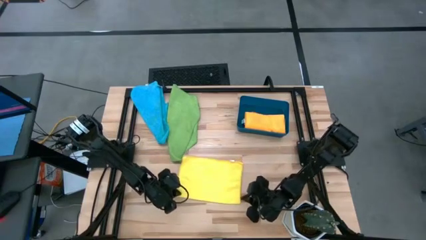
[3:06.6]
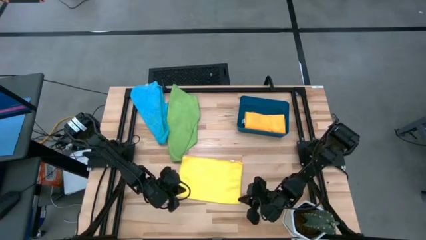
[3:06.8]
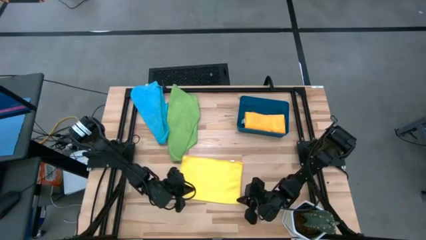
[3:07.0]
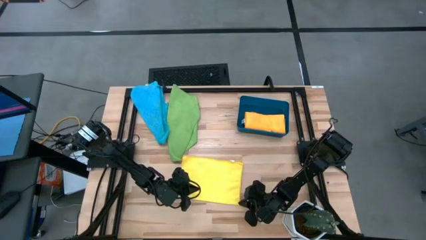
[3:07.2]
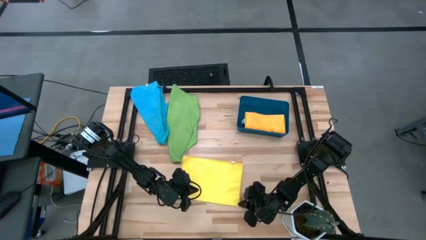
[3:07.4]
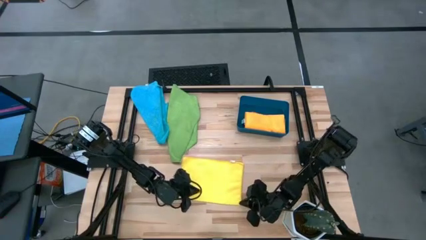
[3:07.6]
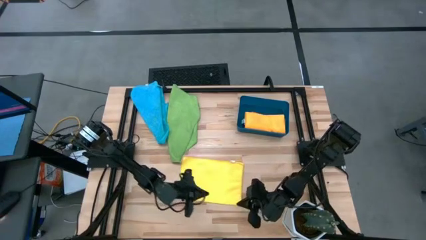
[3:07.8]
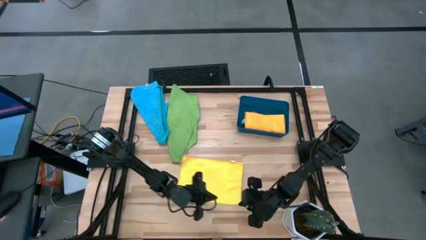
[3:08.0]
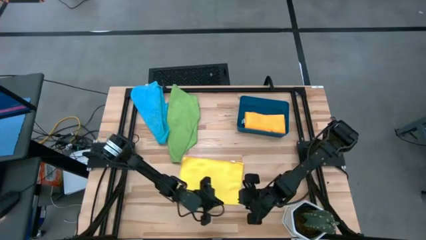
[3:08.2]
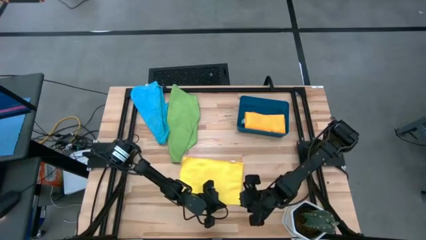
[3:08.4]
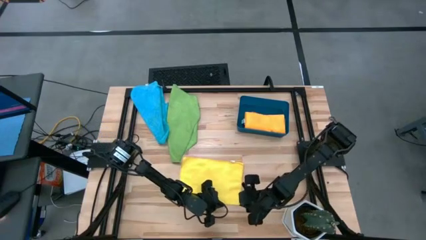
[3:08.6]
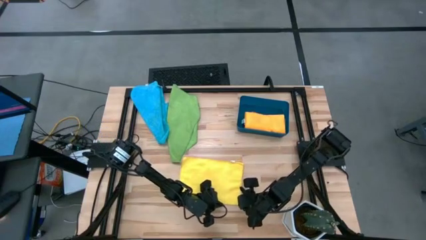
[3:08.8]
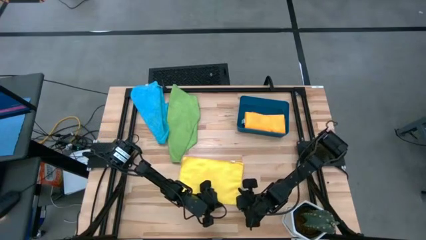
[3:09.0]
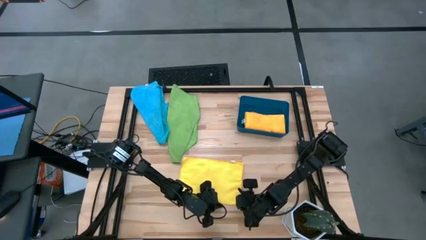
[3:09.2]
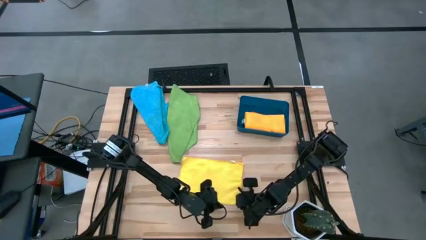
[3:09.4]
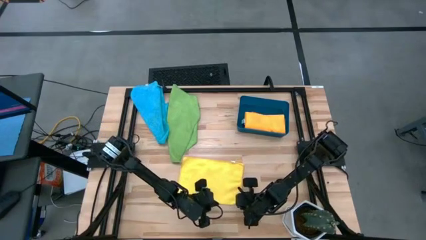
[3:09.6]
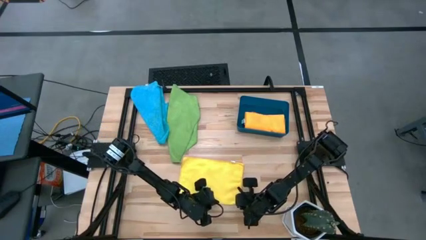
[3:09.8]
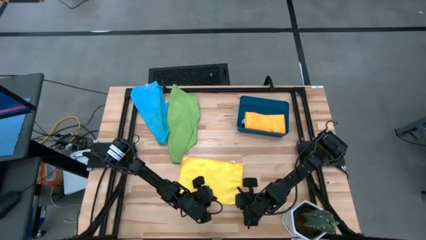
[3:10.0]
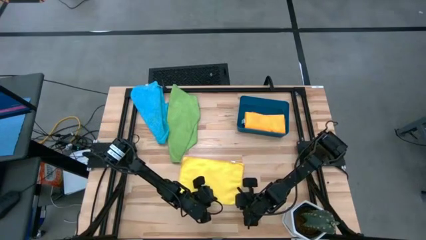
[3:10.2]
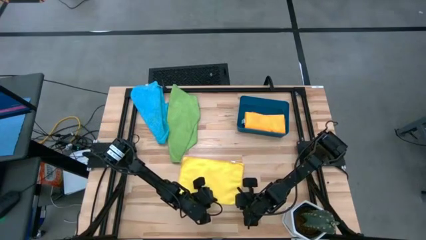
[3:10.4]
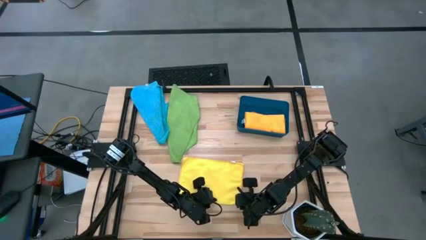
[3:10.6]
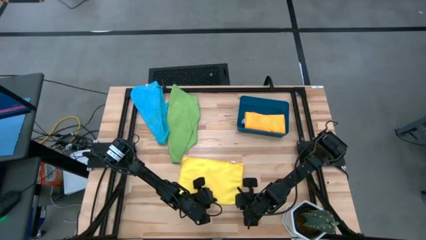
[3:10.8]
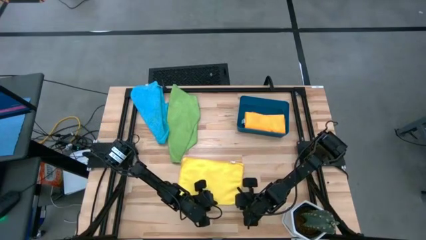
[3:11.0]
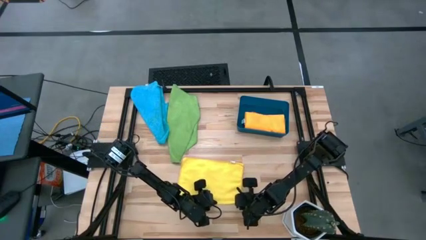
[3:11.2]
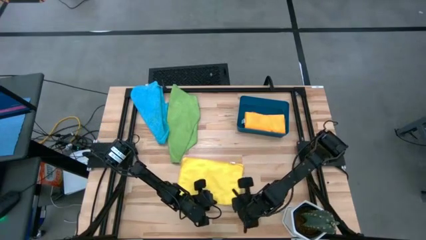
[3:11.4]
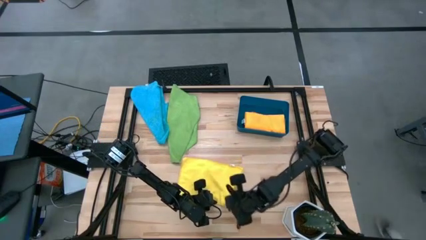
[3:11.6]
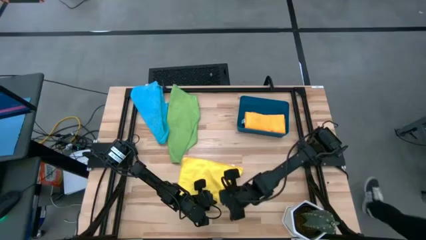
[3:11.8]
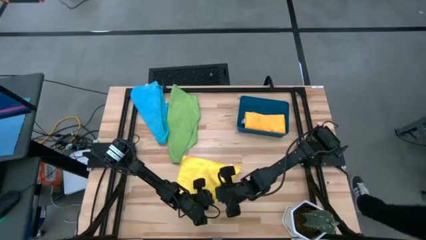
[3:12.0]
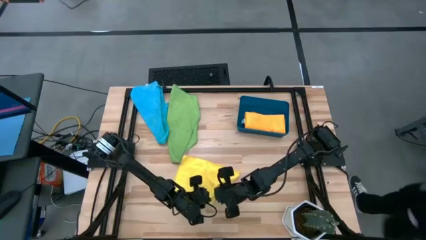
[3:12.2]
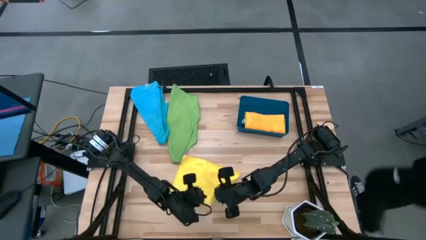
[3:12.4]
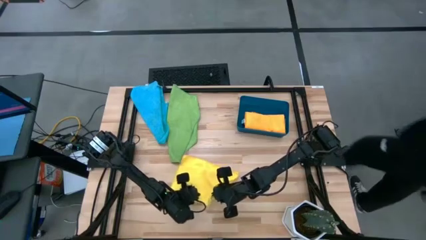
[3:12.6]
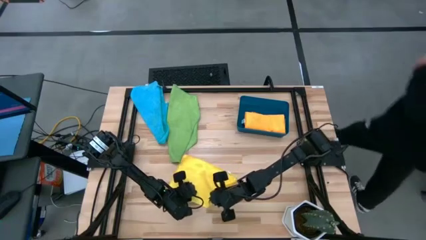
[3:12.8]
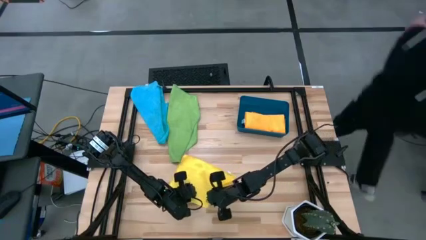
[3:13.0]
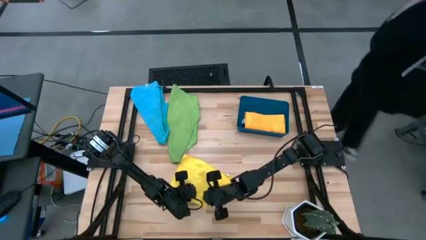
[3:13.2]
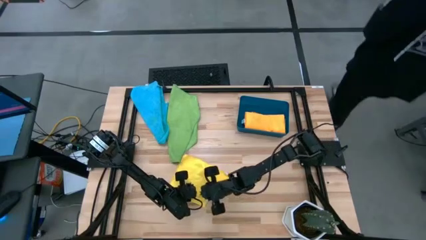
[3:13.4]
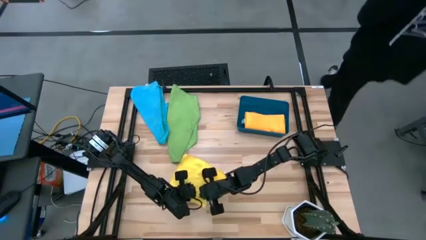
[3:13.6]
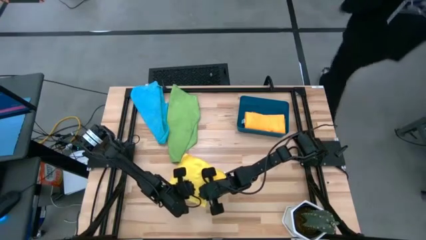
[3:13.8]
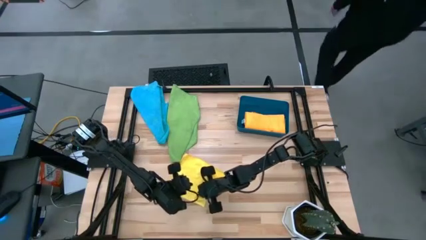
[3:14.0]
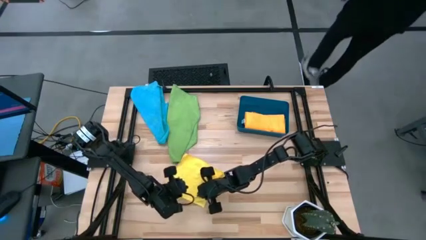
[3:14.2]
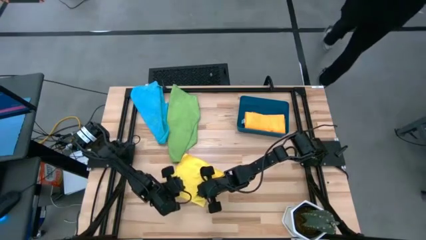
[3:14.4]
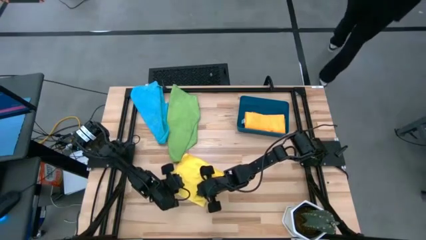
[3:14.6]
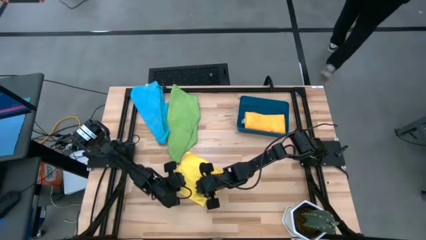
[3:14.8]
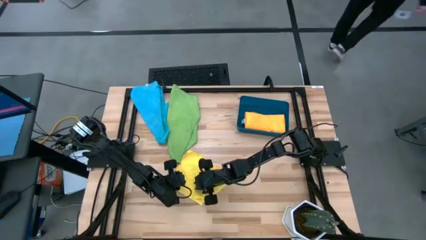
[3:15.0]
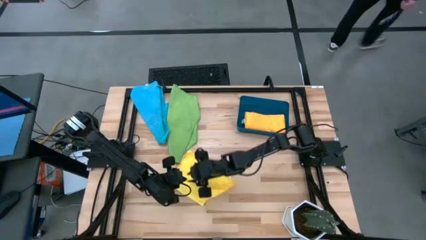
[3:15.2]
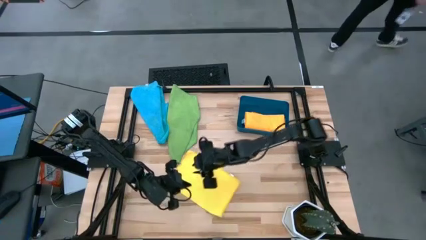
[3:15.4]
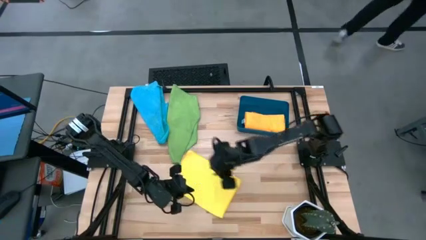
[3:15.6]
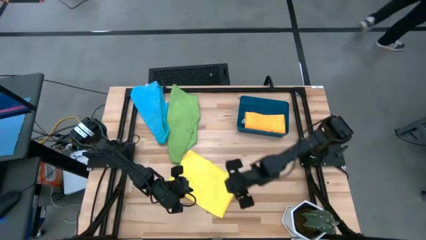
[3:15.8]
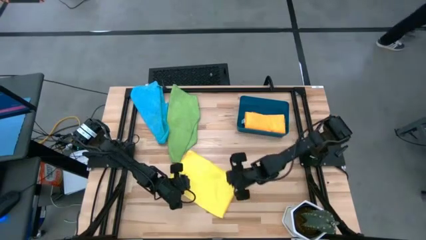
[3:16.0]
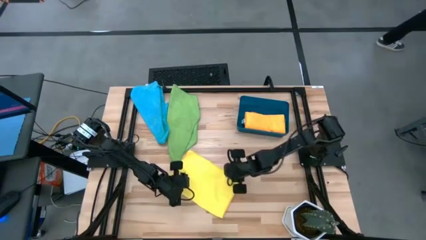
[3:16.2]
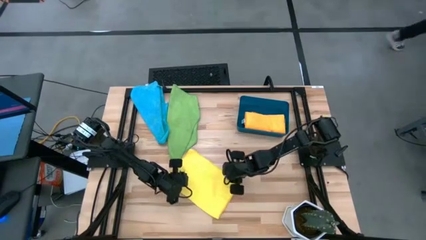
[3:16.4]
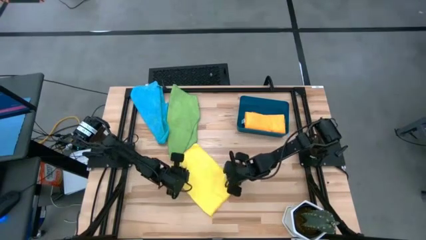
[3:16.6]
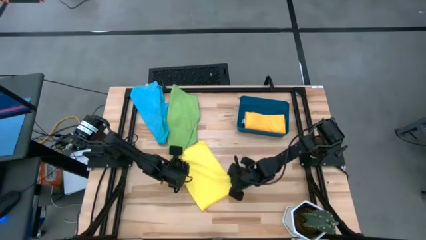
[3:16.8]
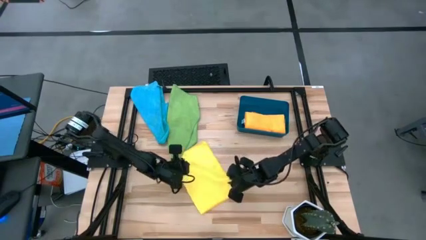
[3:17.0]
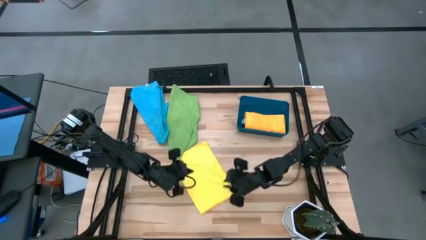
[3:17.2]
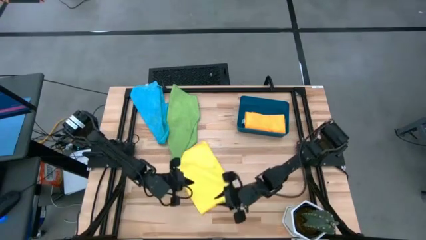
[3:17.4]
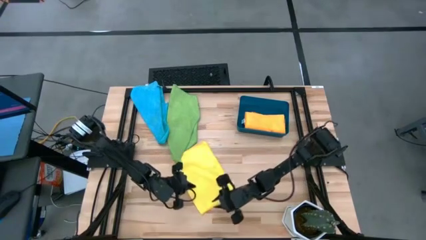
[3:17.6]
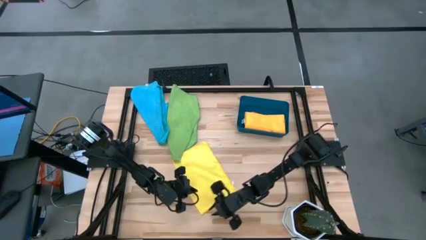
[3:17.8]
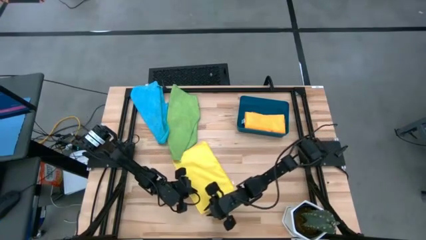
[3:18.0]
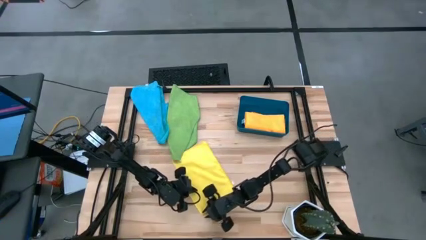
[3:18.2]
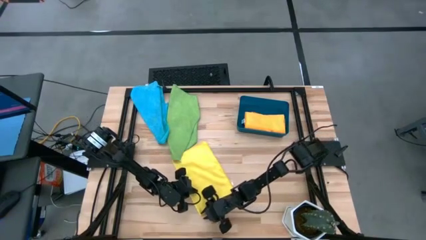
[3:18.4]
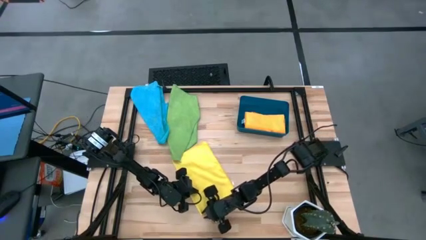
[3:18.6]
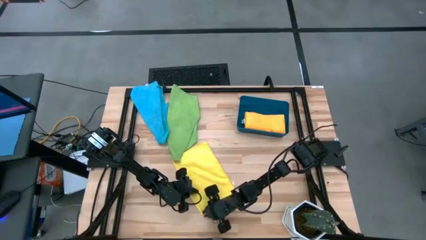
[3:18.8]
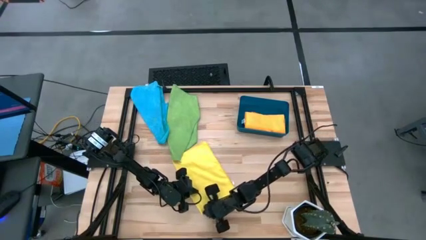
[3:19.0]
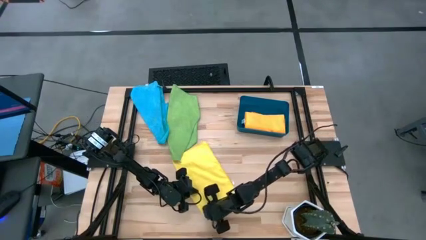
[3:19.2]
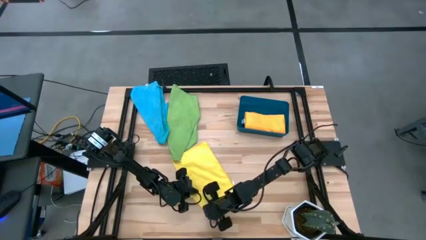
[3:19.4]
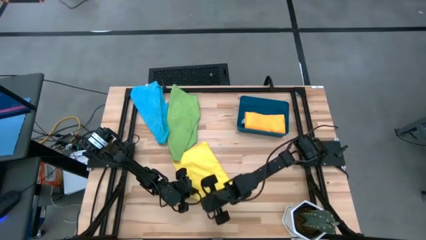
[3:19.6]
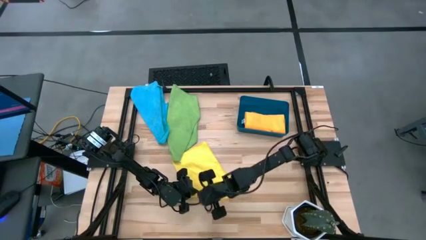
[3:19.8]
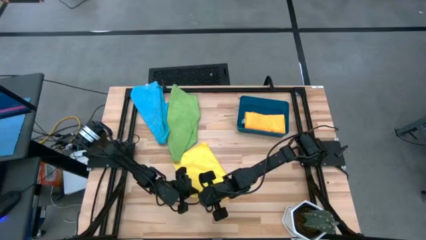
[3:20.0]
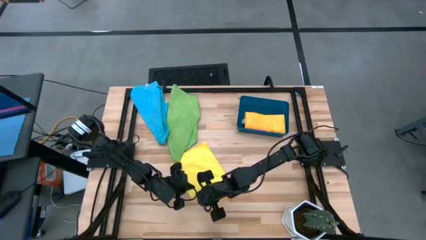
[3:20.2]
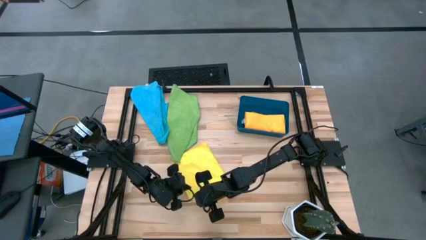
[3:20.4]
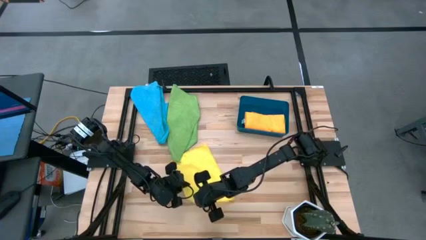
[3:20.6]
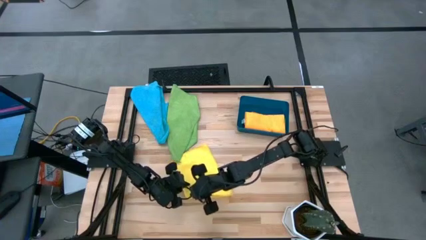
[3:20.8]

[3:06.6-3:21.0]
Task: Fold microfiber towels
Fold the yellow microfiber cloth

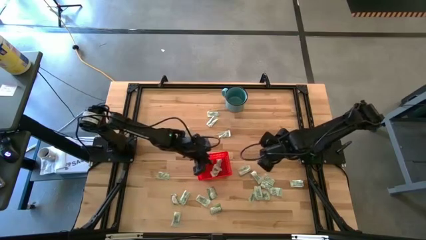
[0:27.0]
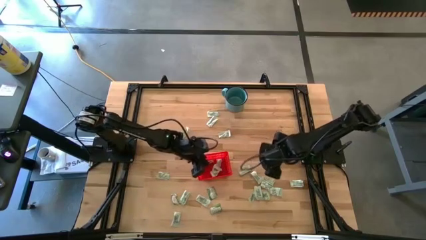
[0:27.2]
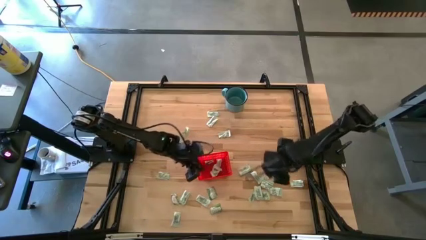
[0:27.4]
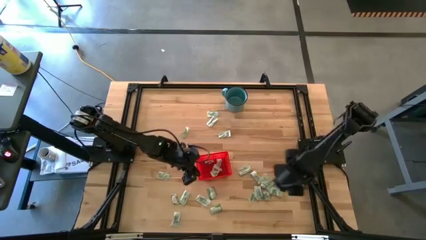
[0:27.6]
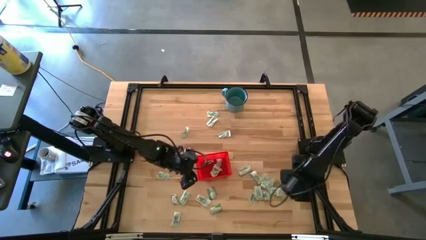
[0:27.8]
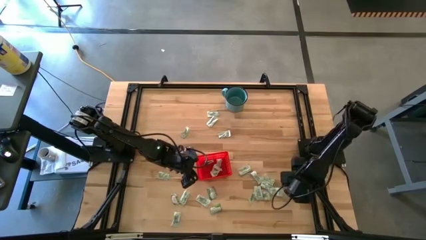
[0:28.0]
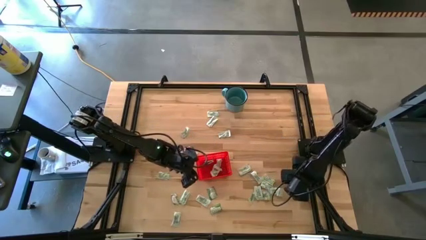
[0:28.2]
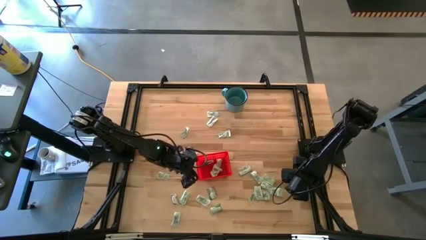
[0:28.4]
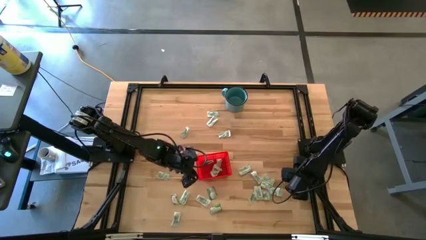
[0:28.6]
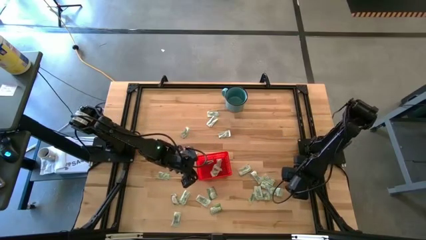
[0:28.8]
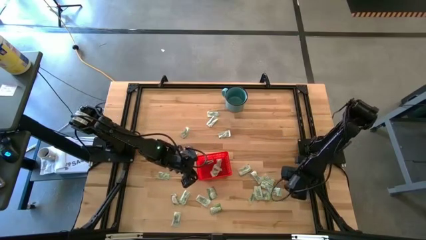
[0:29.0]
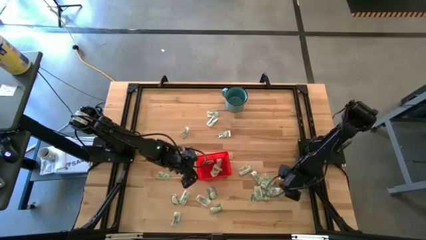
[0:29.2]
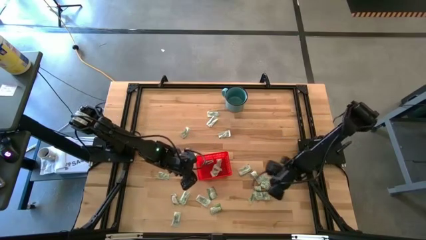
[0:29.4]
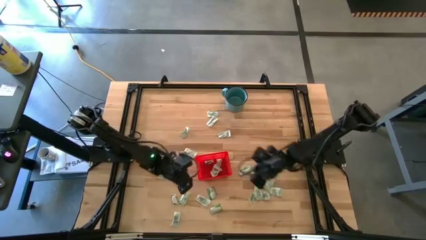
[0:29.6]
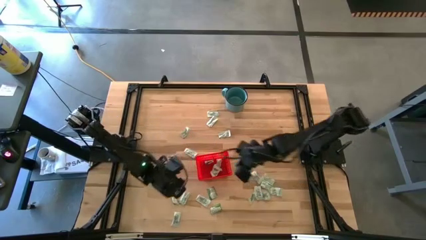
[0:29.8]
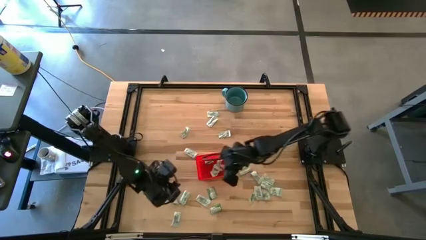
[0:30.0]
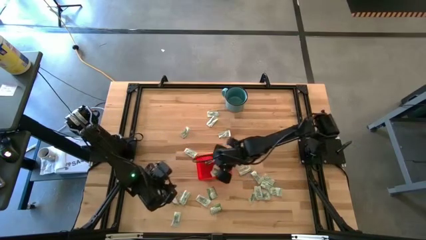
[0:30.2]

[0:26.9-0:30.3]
Task: Pick and place Stevia / Truvia into bins
Put the green stevia packet into the red bin
